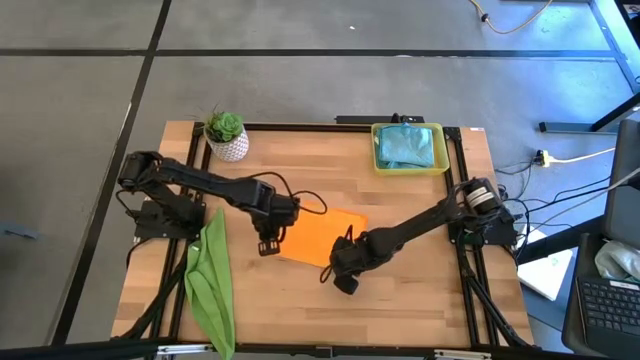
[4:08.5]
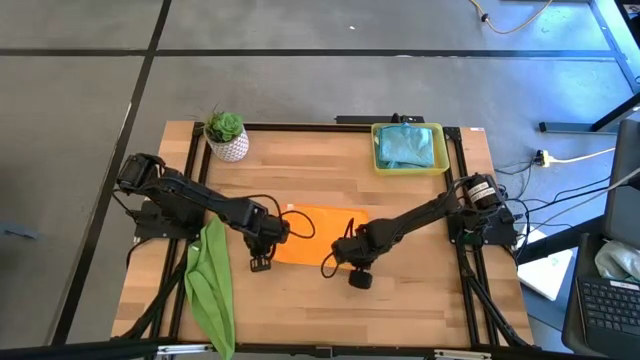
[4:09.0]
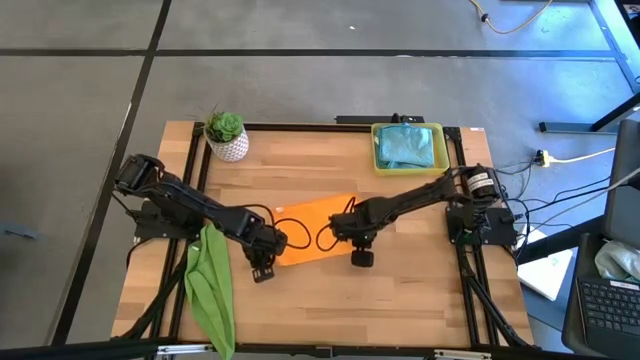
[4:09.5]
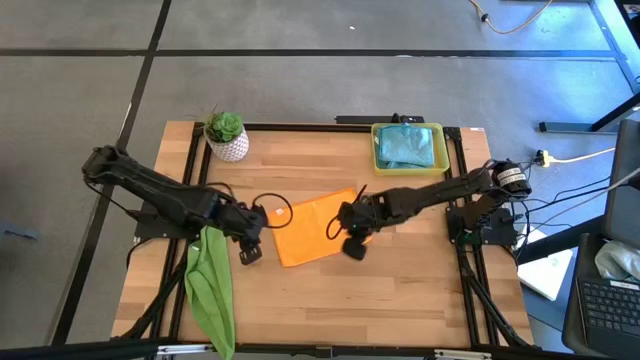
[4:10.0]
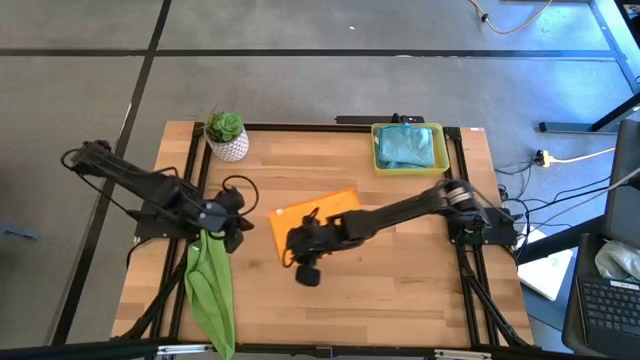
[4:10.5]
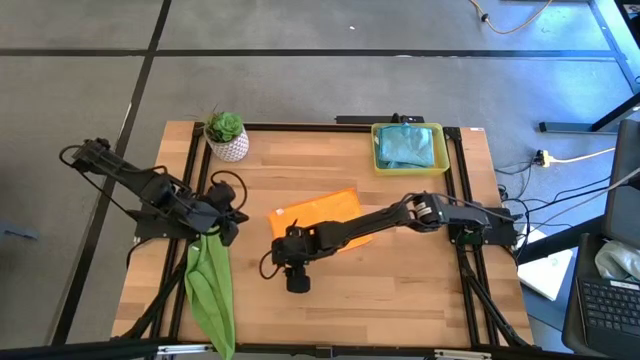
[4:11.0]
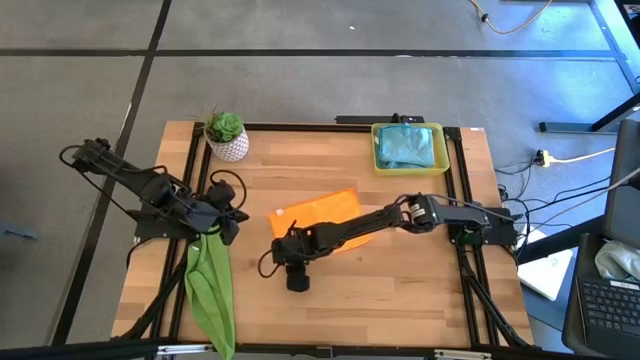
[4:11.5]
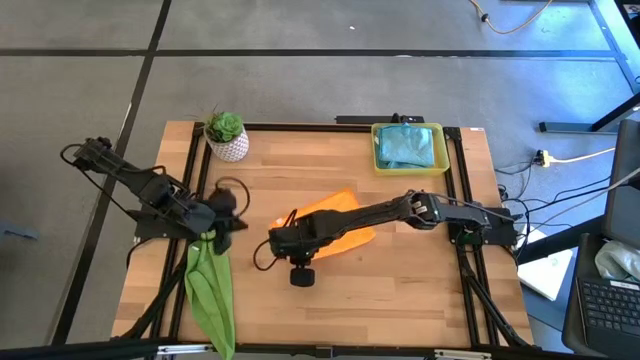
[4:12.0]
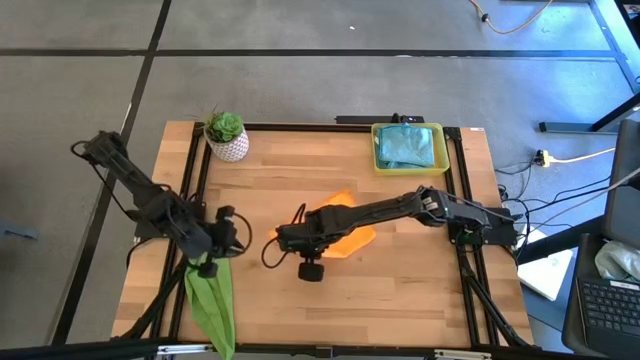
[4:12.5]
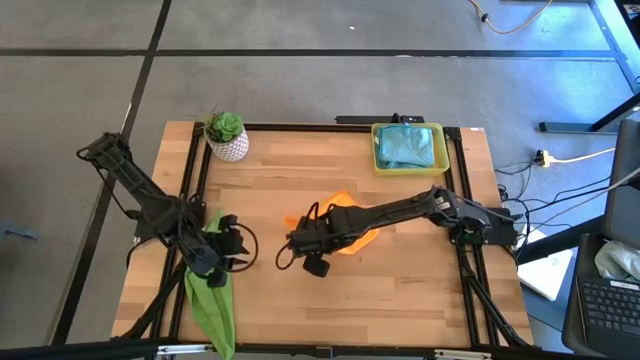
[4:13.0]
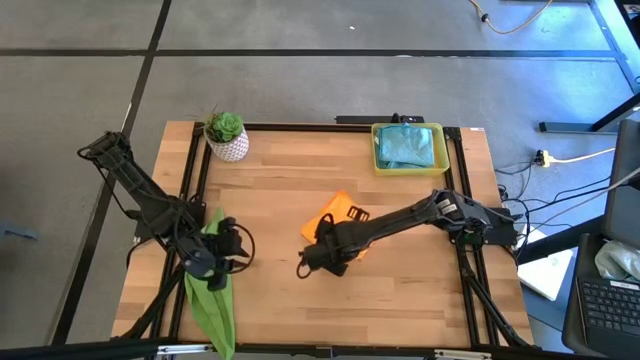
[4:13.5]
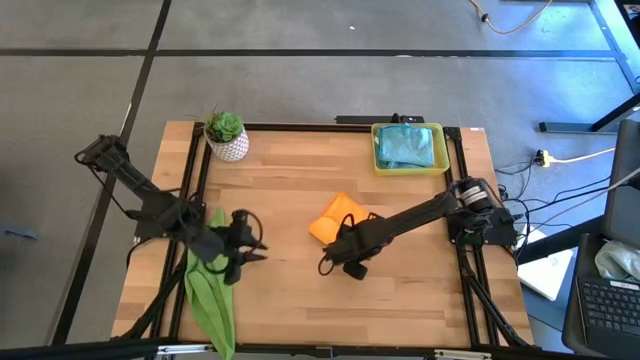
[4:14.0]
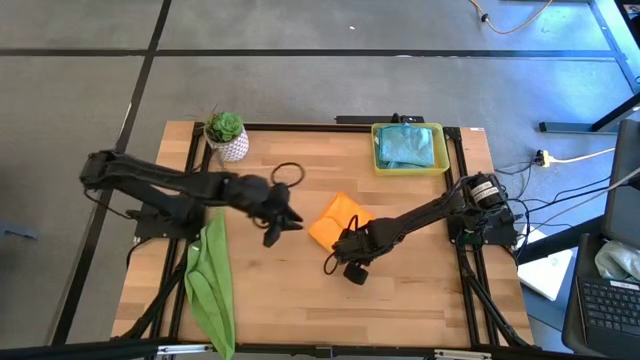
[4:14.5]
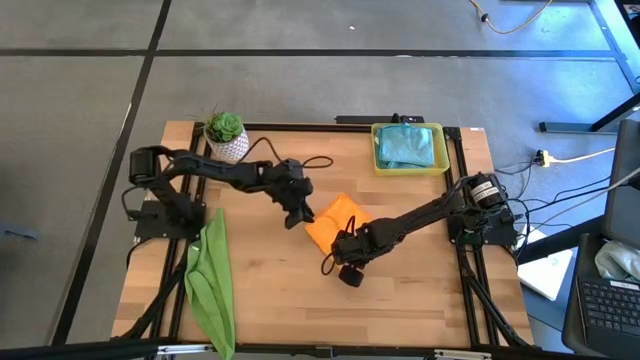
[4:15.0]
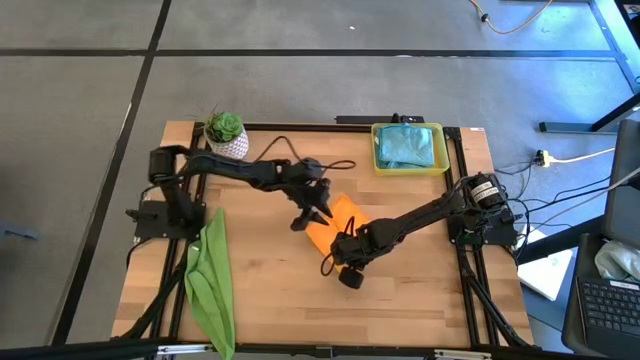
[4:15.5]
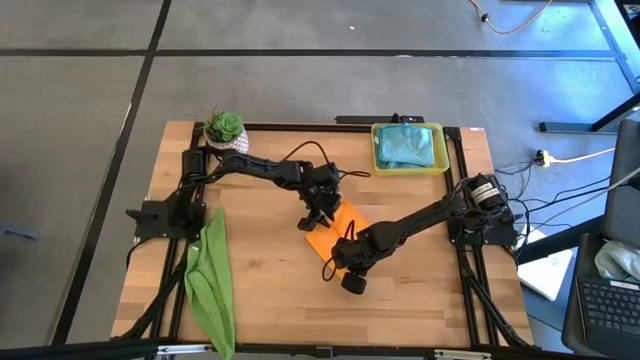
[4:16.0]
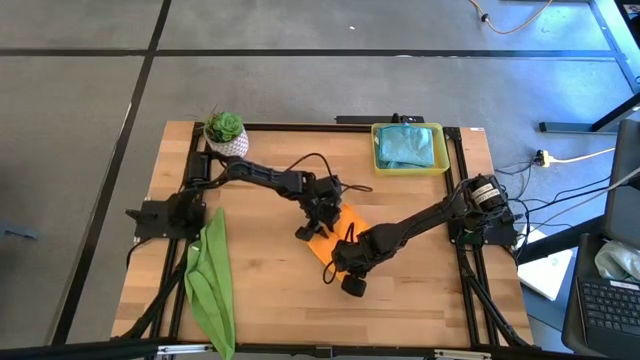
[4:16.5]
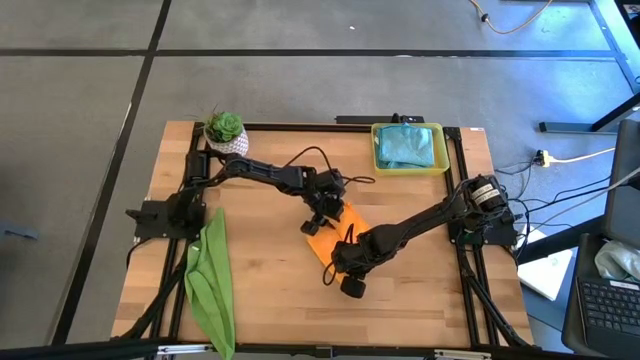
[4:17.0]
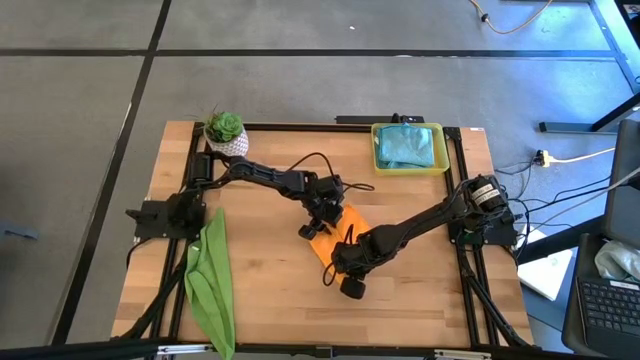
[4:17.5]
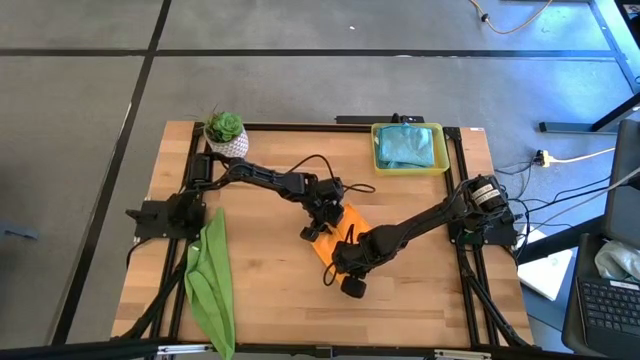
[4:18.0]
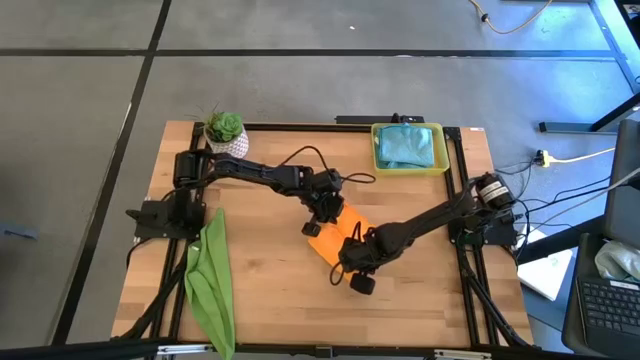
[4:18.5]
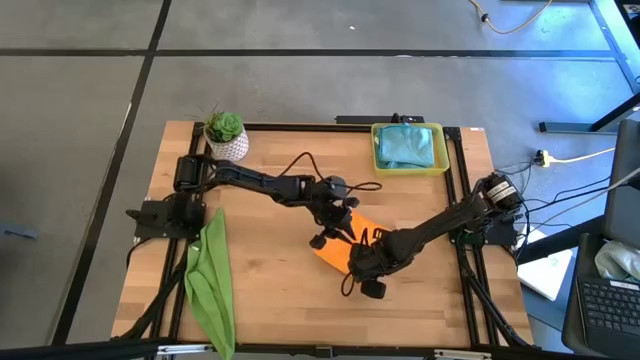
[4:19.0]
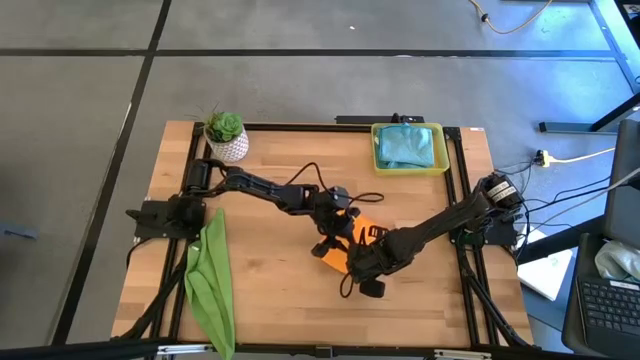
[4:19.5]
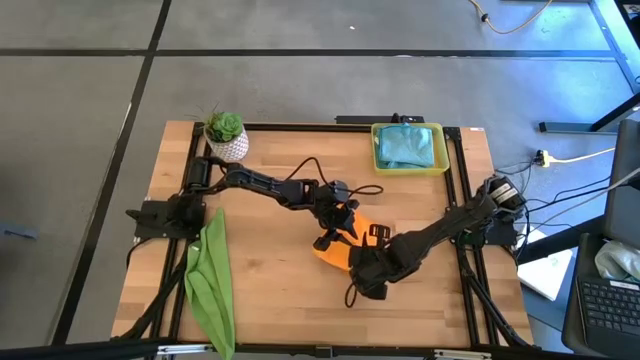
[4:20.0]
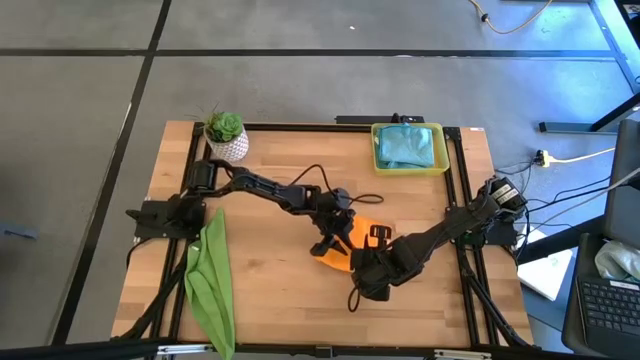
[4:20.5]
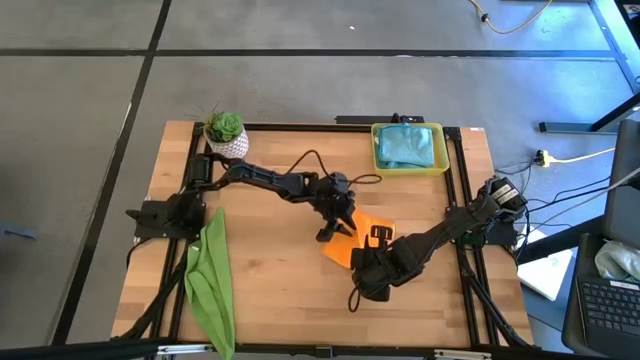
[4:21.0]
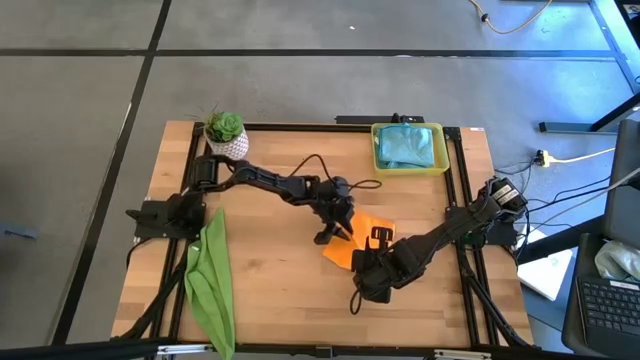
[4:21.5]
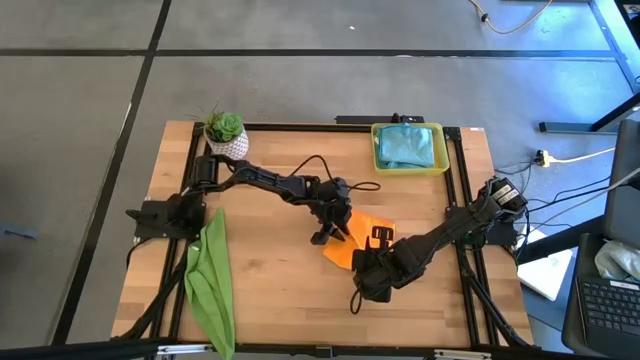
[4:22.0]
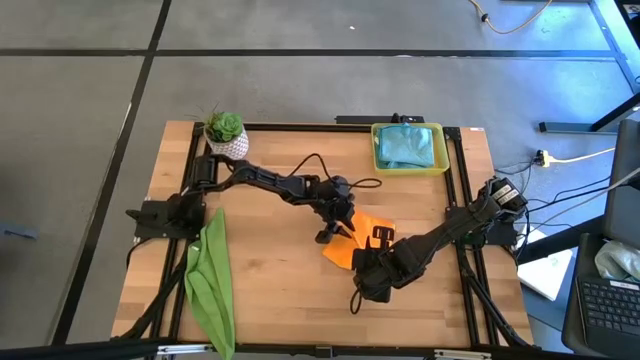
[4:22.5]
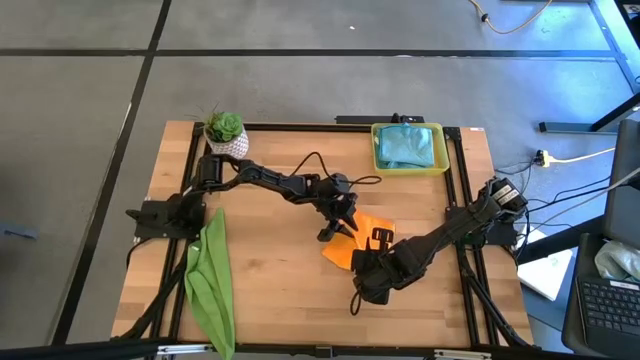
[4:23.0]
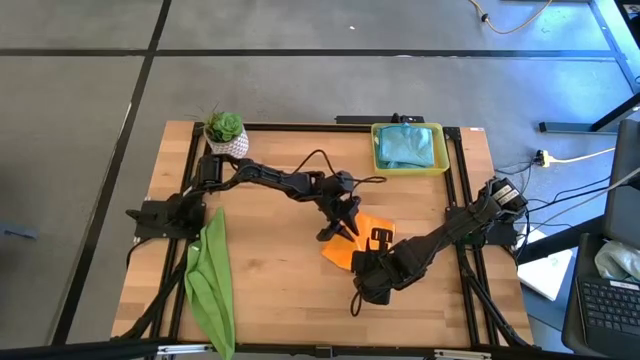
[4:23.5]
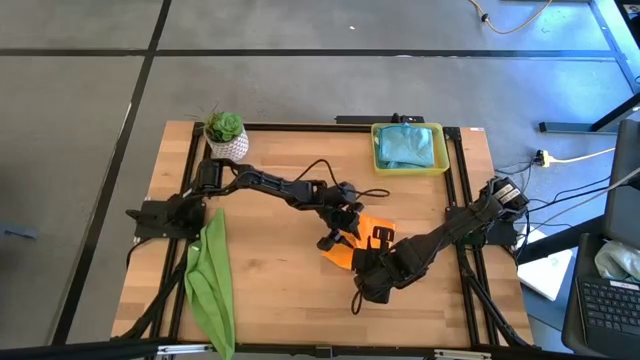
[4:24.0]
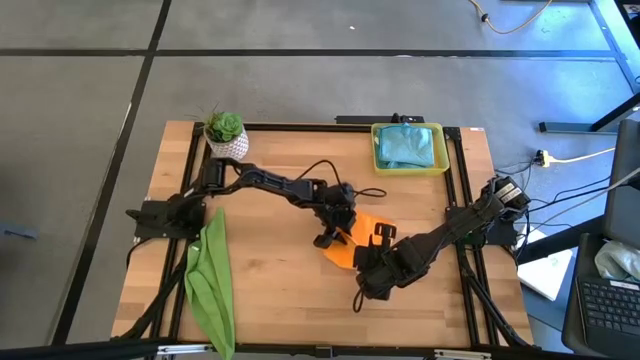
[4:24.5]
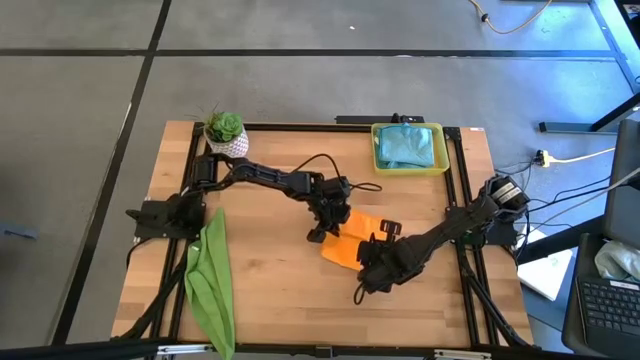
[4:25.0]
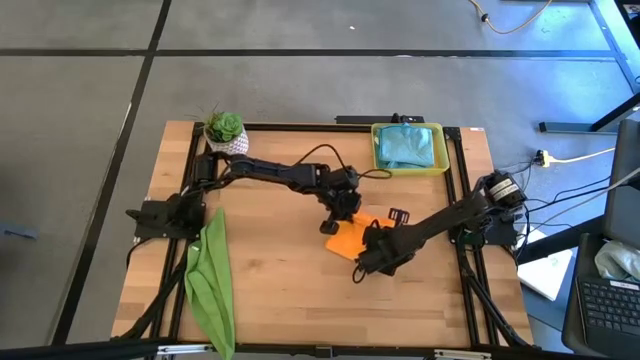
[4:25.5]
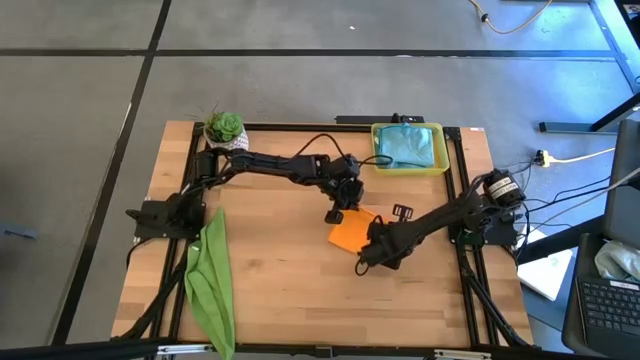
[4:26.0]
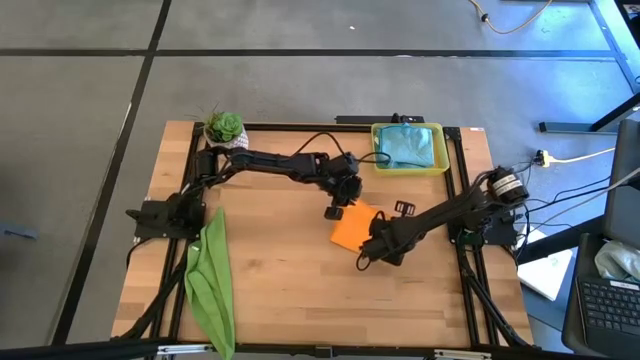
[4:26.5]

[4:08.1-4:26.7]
Task: Fold microfiber towels
Fold the orange microfiber towel

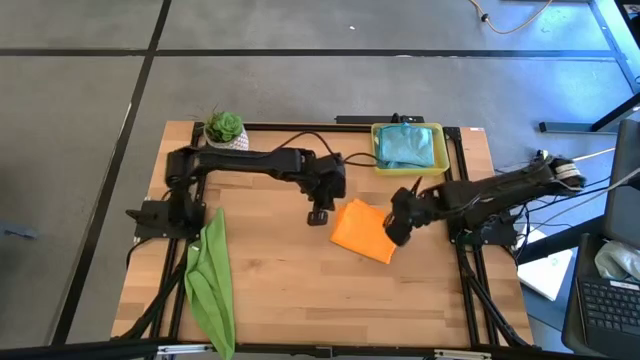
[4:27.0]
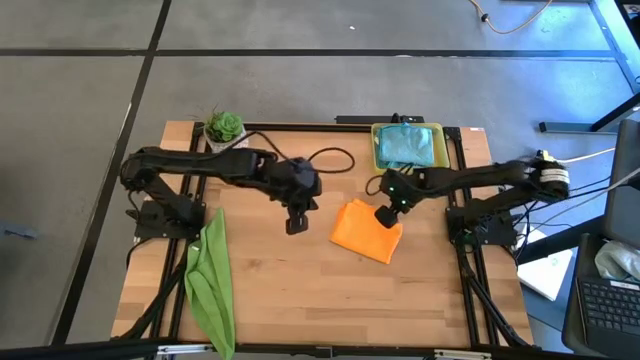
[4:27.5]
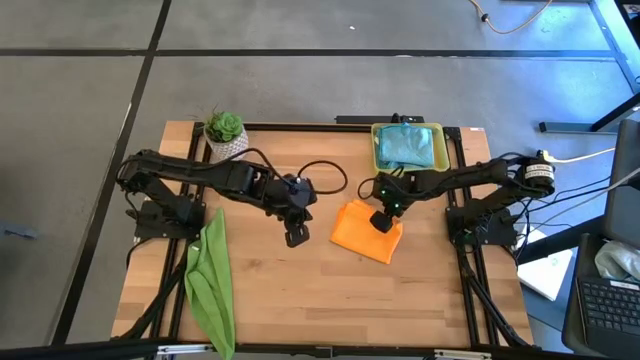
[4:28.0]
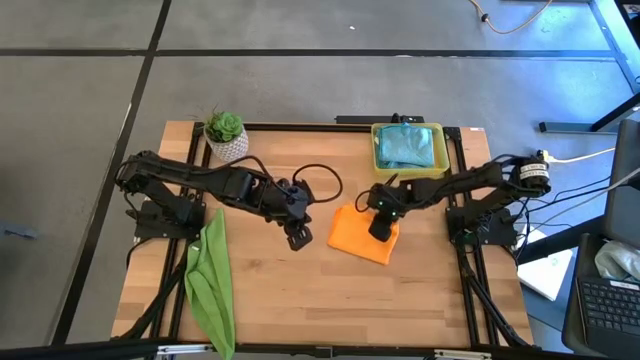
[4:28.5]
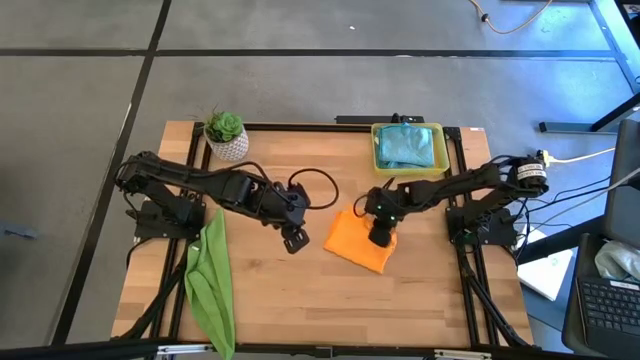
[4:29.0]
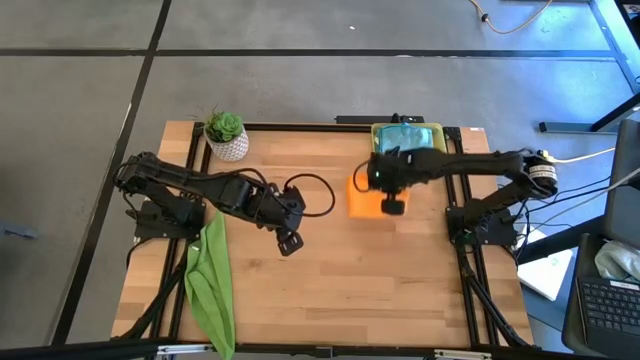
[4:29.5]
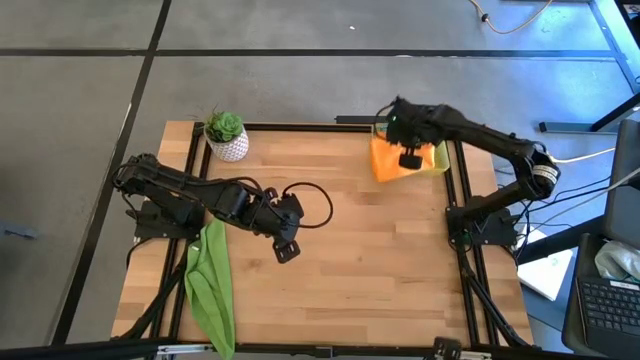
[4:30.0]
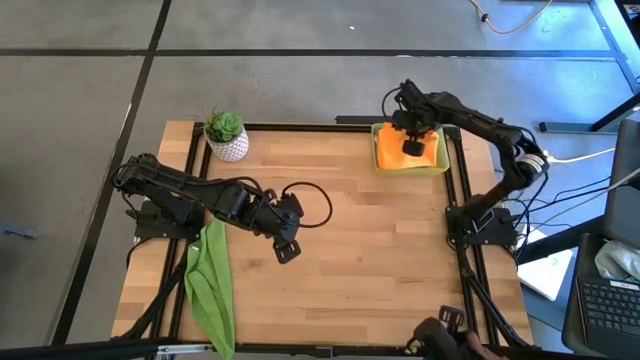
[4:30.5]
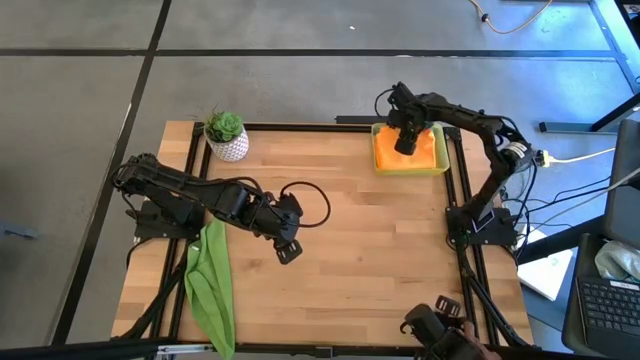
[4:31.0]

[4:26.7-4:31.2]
Put the folded orange microfiber towel into the bin
